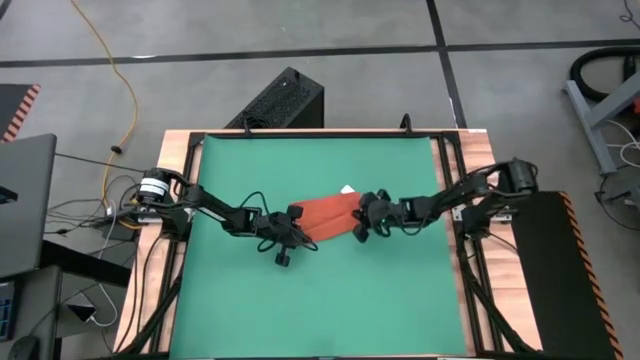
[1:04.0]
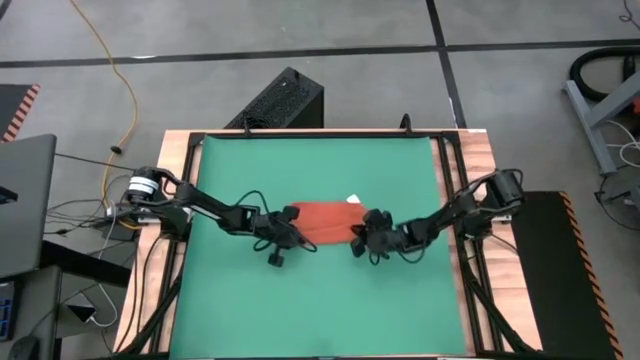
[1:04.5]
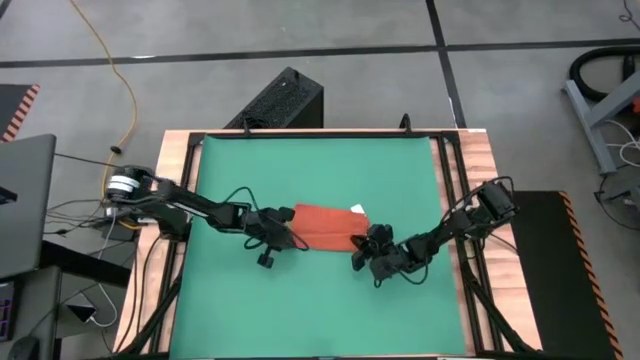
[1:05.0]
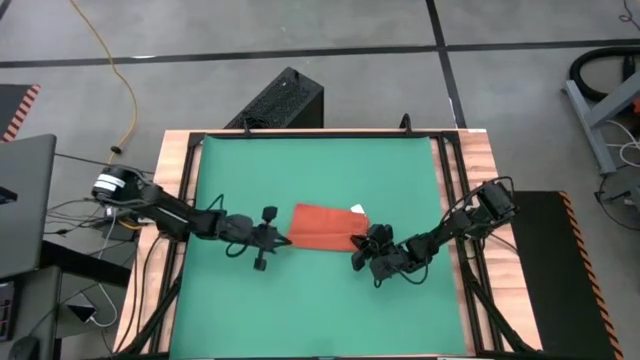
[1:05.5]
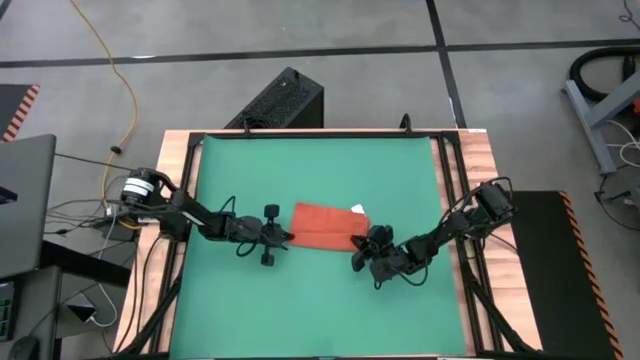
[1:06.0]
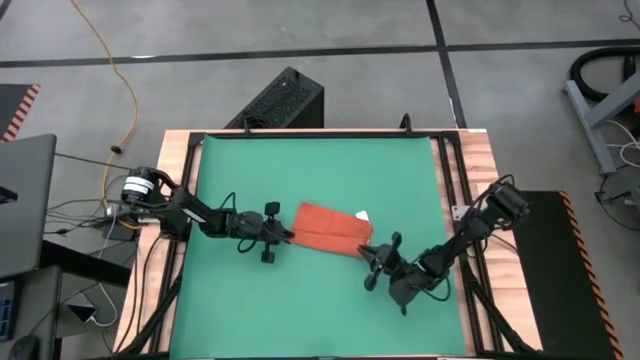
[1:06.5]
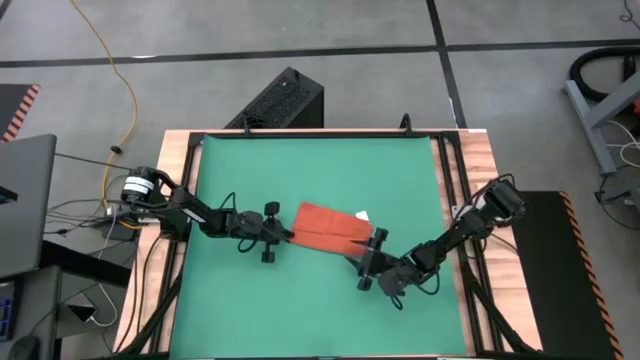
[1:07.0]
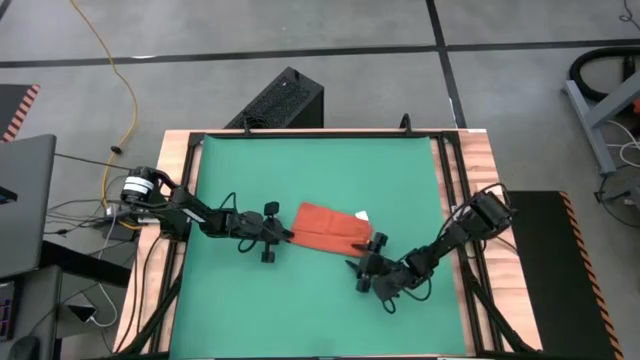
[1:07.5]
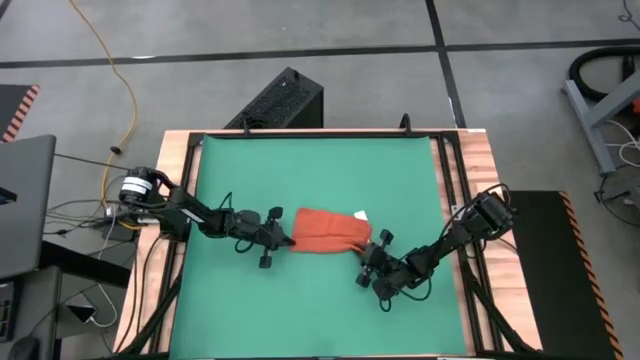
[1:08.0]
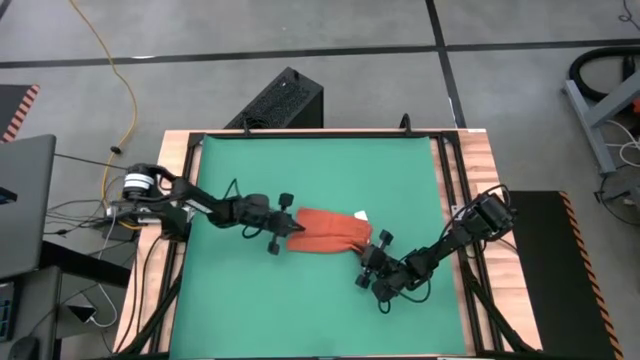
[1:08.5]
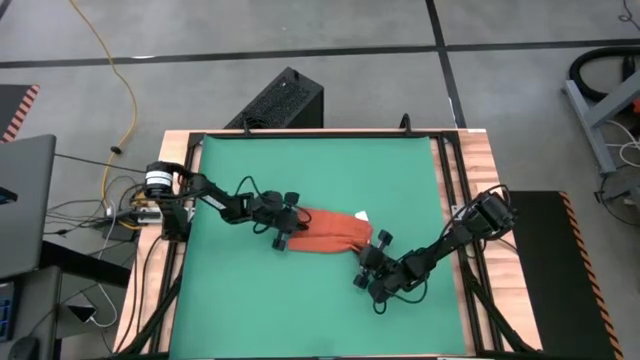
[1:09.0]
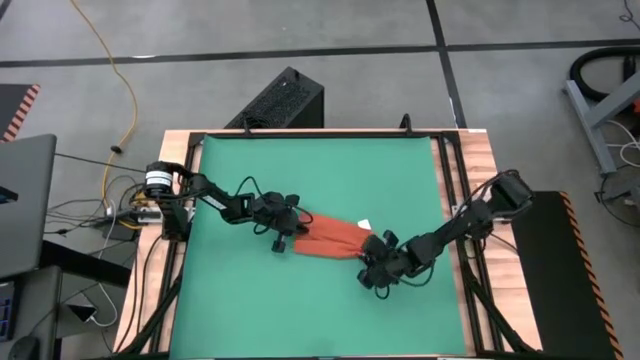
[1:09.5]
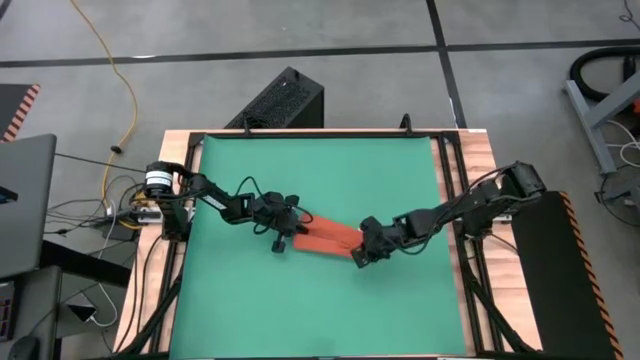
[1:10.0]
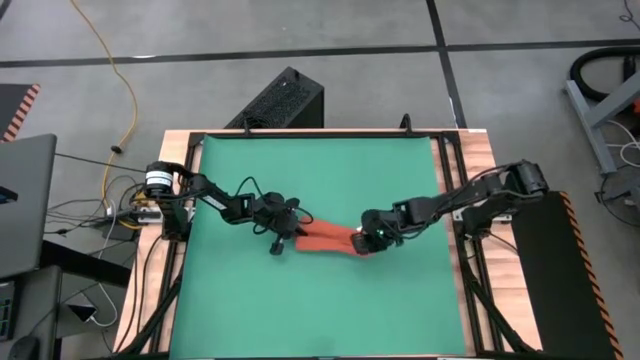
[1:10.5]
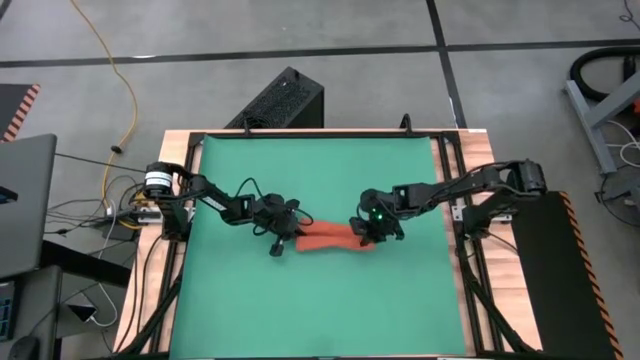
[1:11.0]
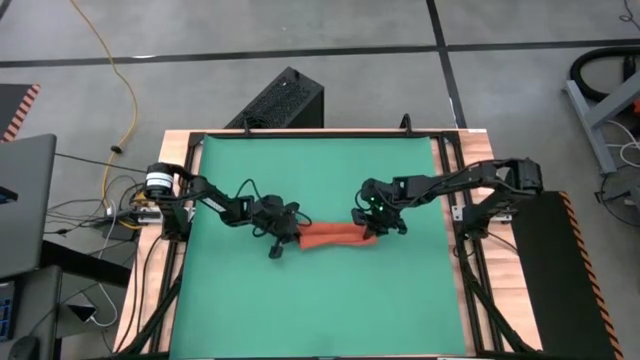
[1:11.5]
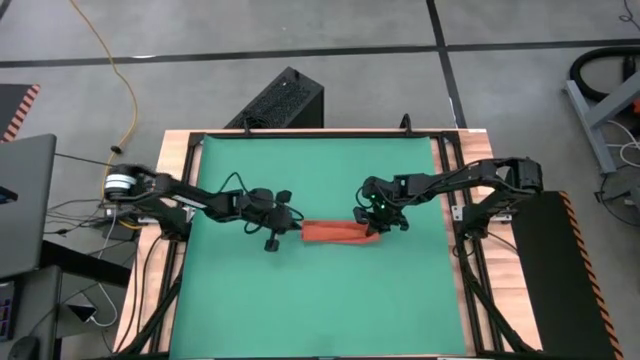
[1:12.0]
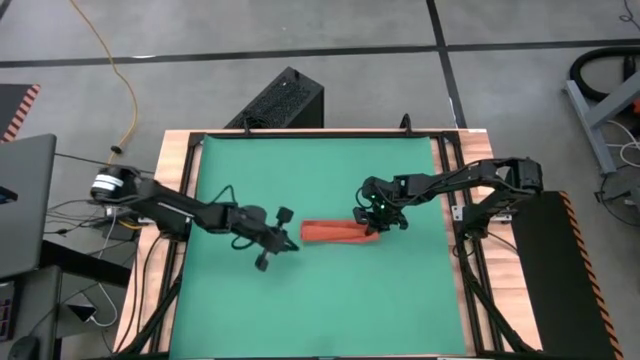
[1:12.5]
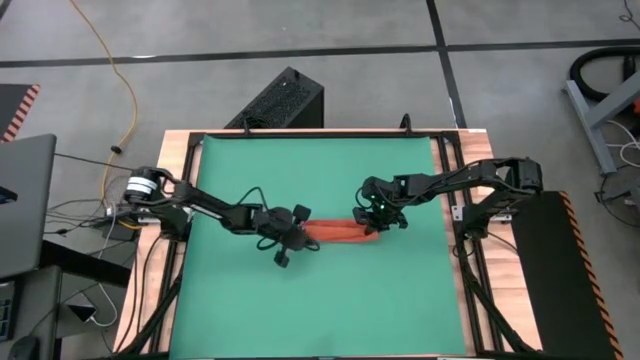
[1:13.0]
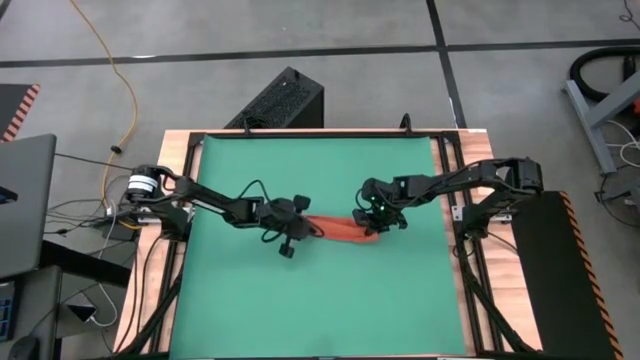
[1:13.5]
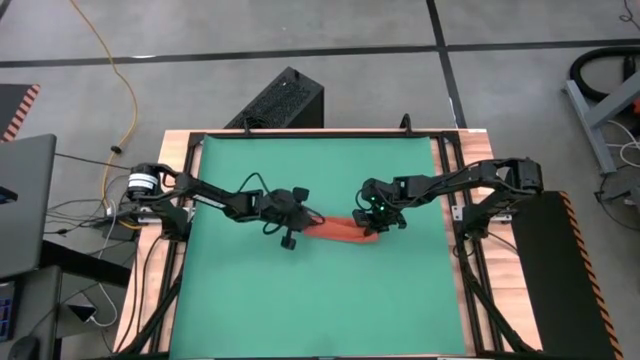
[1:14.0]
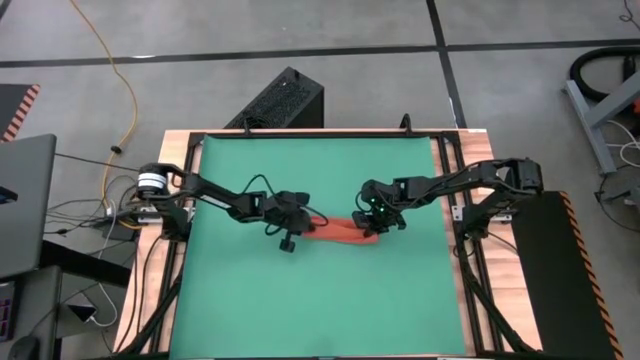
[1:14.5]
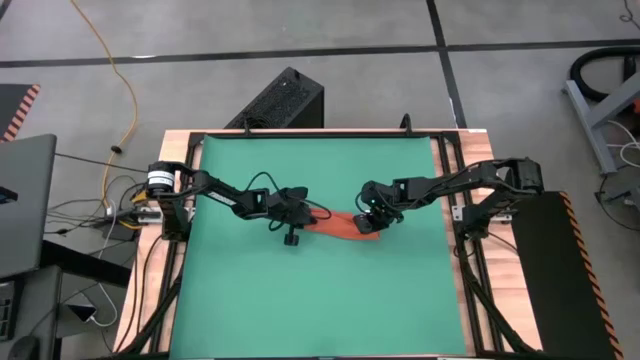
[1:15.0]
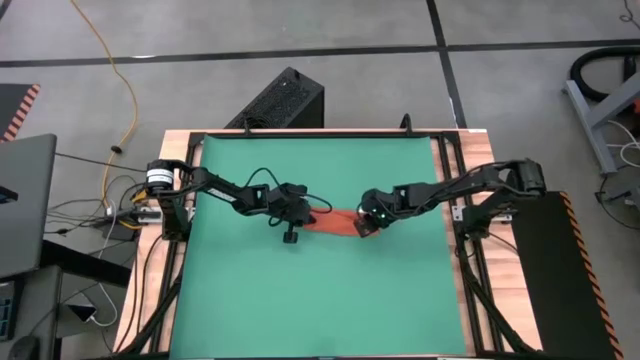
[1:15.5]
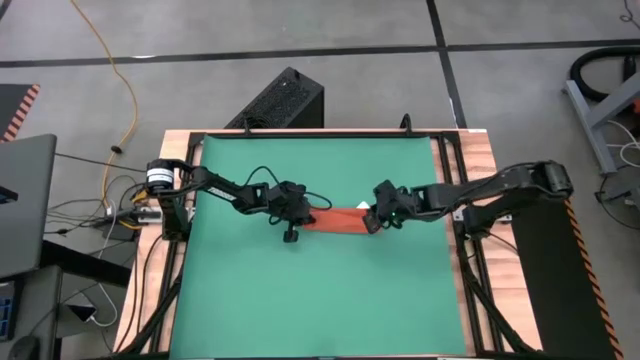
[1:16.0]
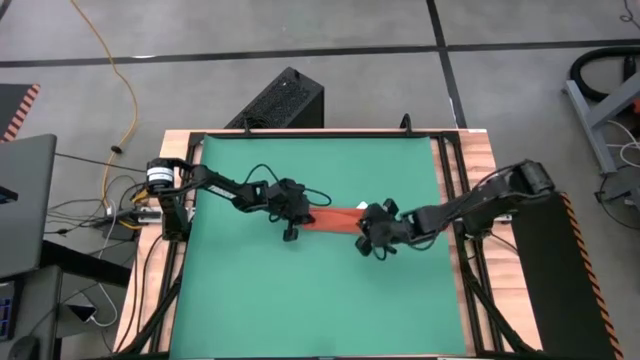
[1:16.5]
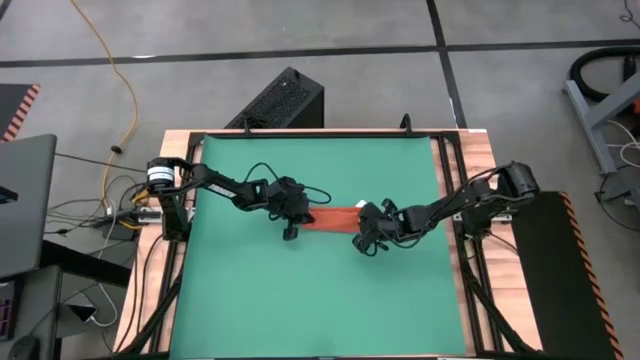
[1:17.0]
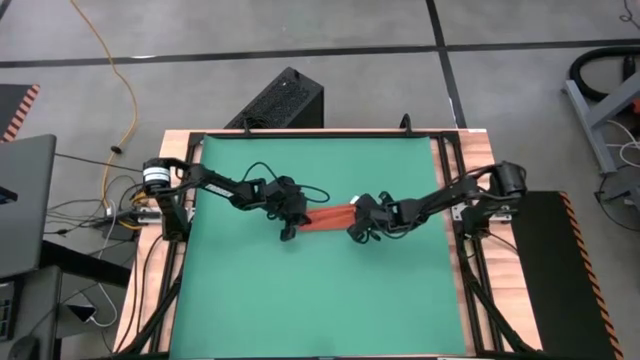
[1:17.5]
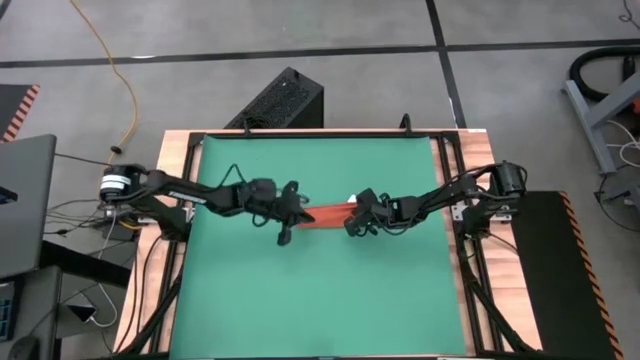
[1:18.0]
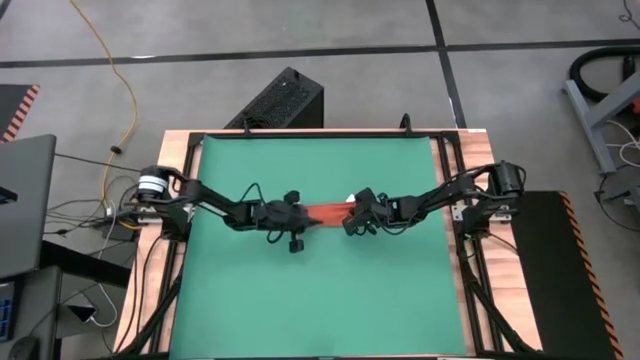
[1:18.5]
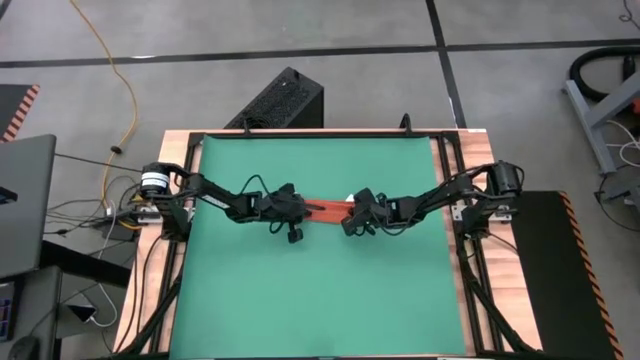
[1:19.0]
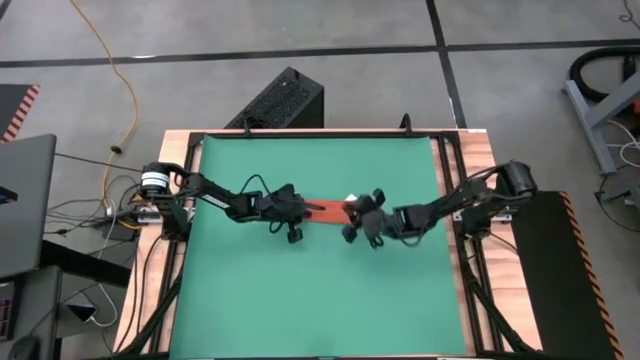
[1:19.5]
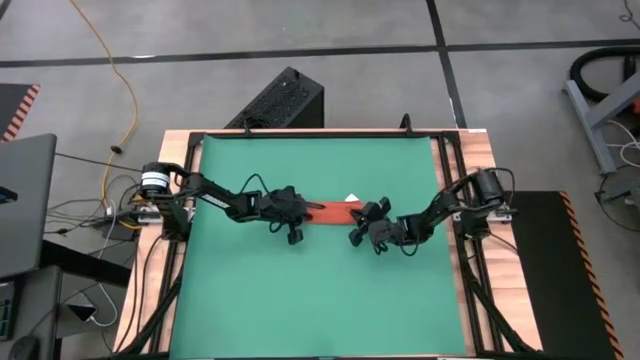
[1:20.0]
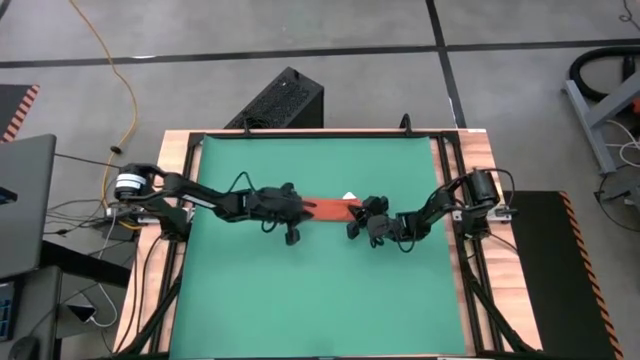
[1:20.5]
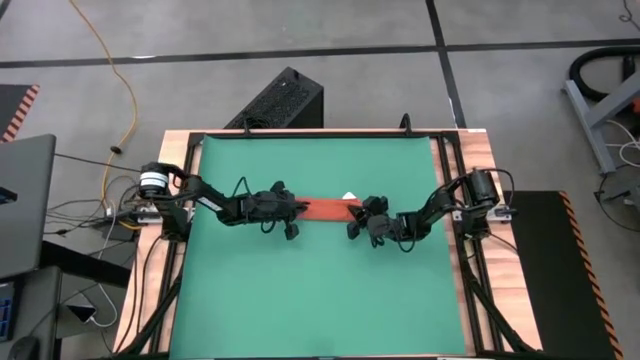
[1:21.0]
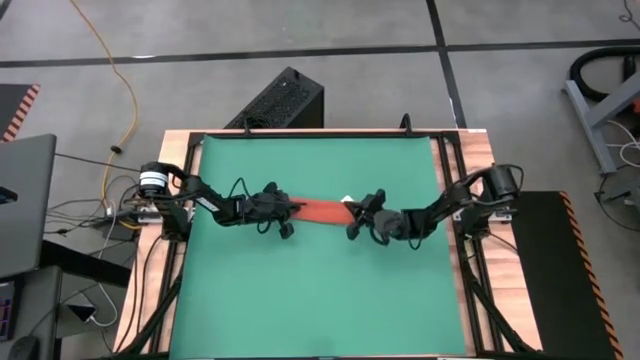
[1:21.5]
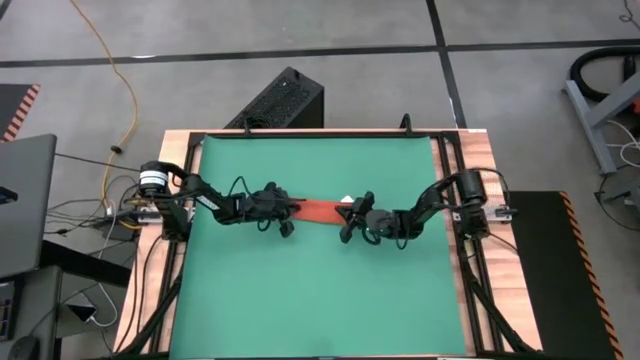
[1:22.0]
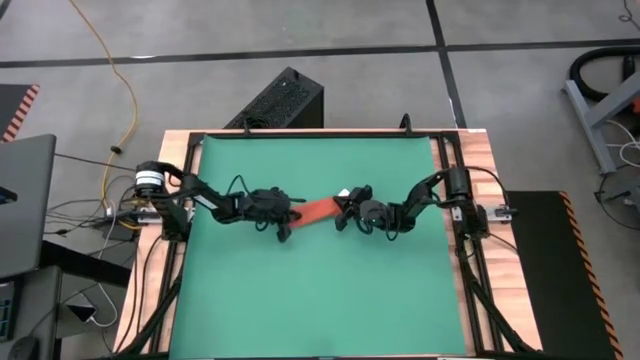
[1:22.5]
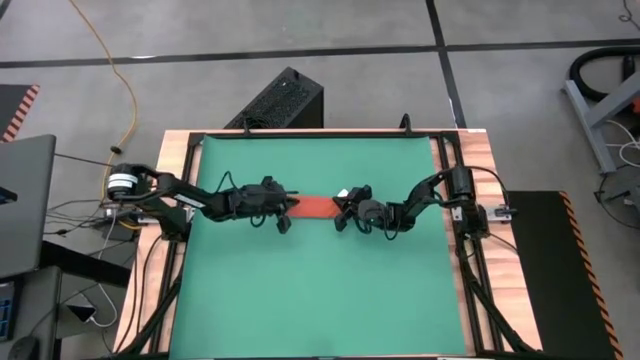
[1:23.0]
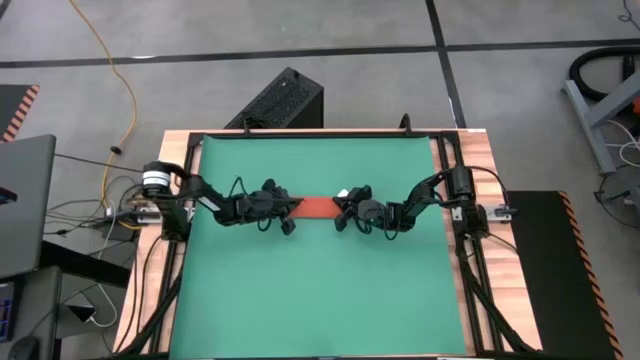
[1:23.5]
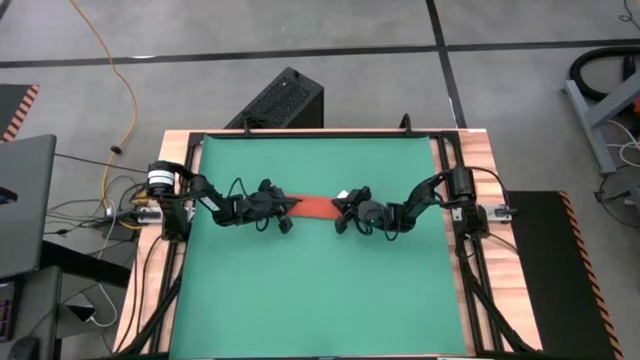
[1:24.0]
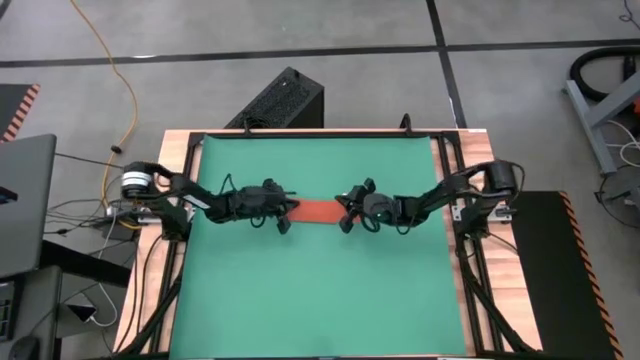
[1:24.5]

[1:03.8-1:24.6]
Task: Roll towel into tight, uniform cylinder
Roll the orange towel
